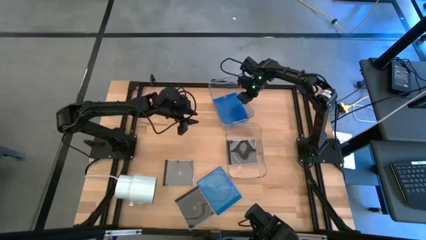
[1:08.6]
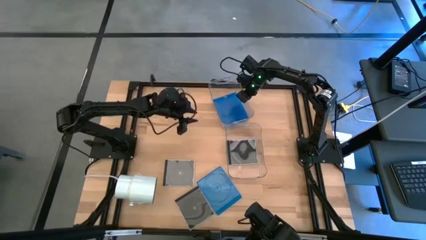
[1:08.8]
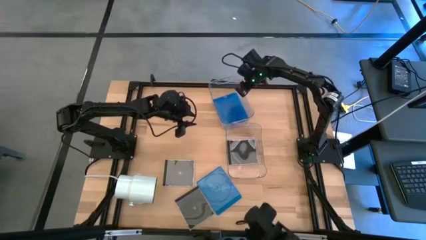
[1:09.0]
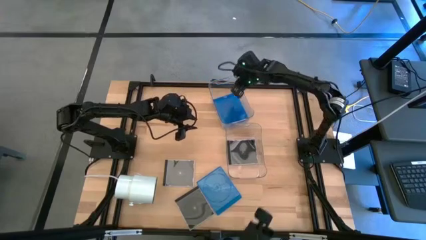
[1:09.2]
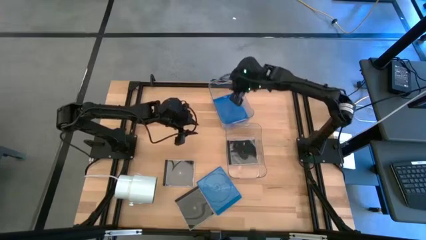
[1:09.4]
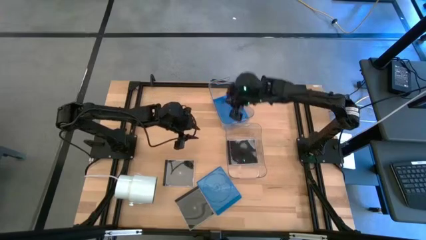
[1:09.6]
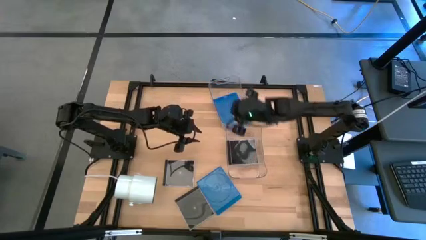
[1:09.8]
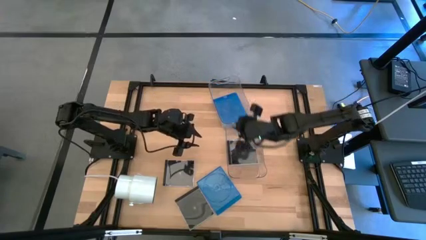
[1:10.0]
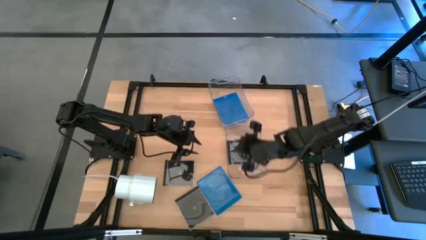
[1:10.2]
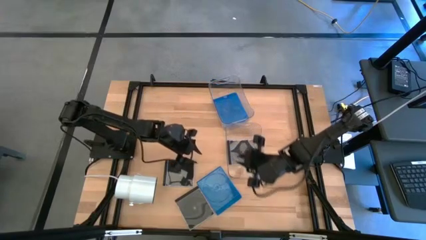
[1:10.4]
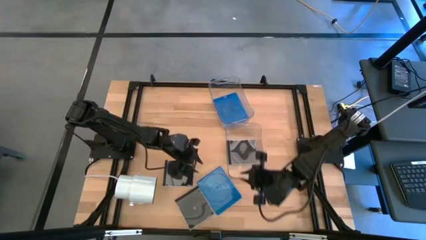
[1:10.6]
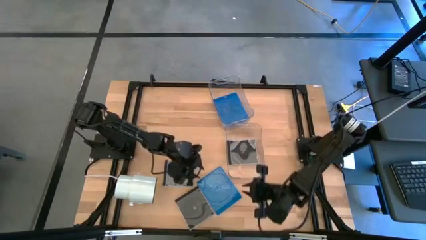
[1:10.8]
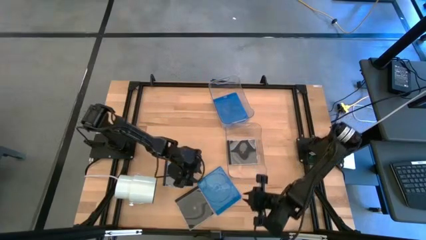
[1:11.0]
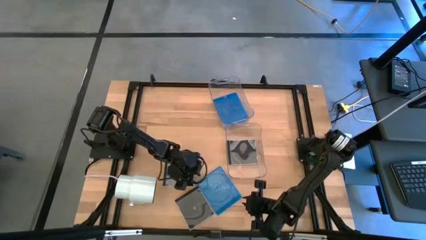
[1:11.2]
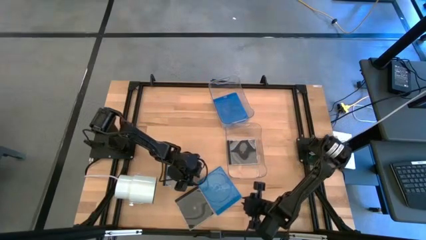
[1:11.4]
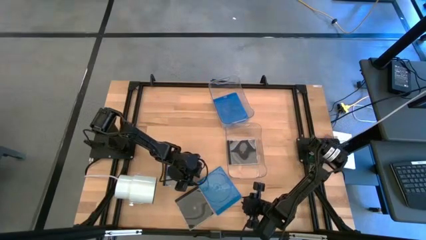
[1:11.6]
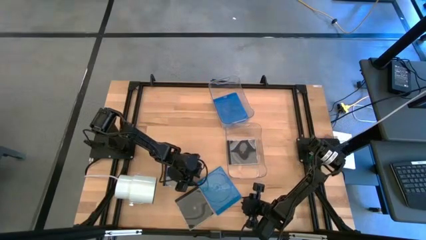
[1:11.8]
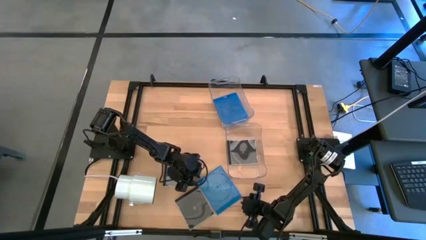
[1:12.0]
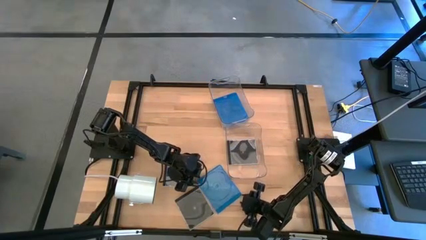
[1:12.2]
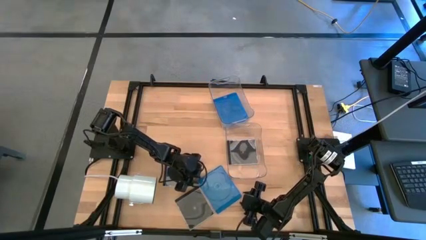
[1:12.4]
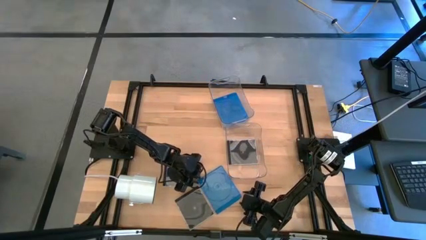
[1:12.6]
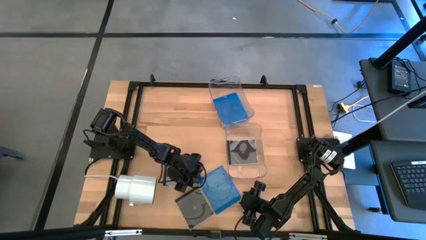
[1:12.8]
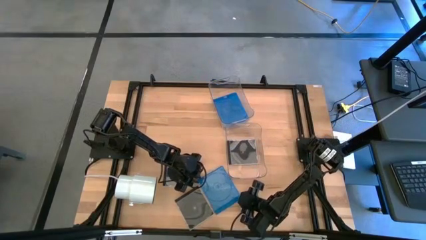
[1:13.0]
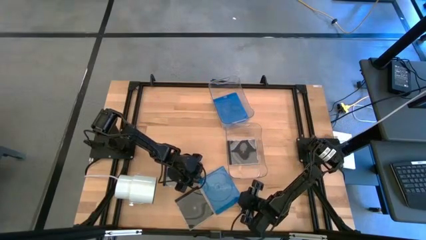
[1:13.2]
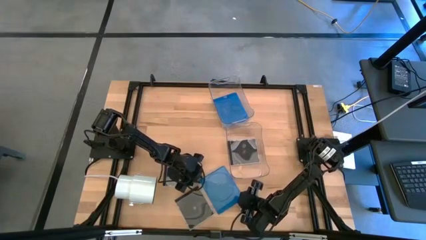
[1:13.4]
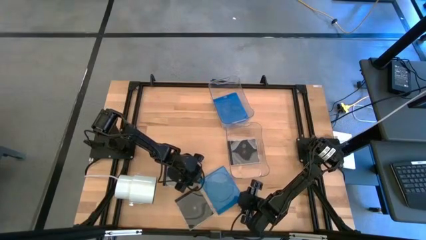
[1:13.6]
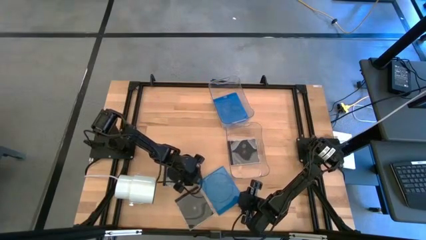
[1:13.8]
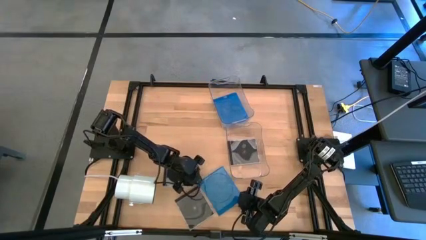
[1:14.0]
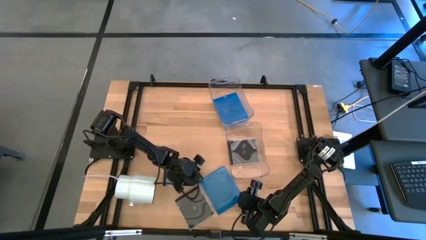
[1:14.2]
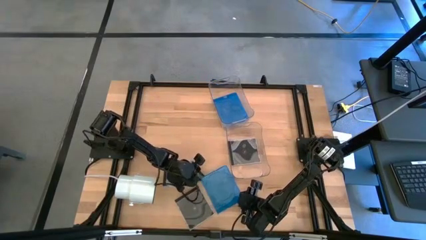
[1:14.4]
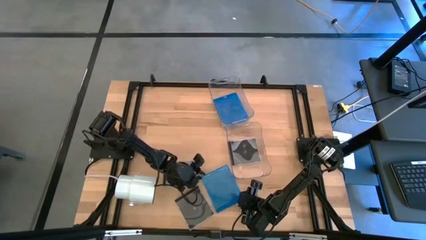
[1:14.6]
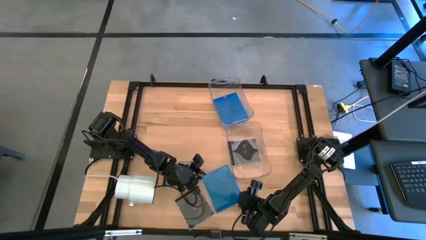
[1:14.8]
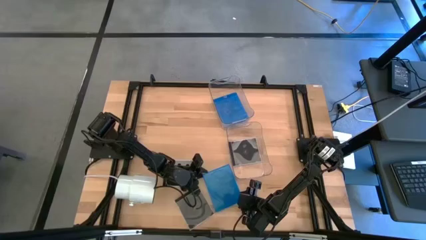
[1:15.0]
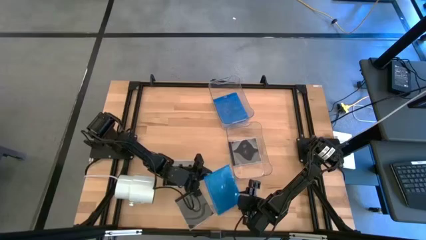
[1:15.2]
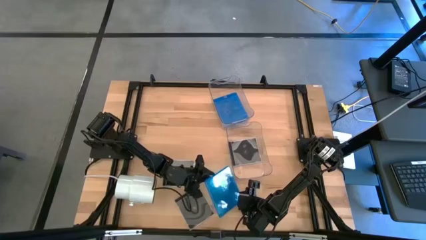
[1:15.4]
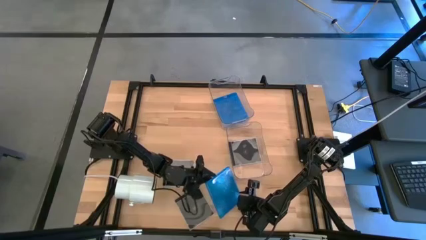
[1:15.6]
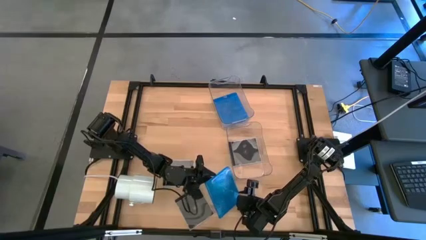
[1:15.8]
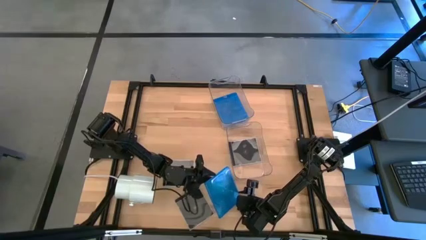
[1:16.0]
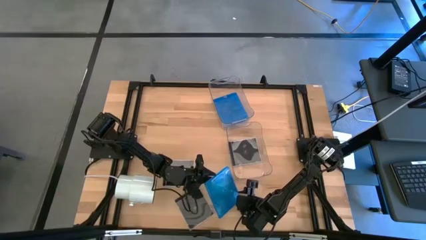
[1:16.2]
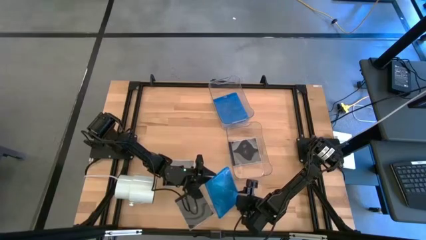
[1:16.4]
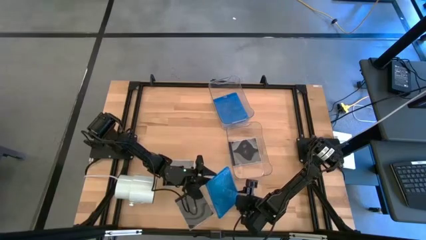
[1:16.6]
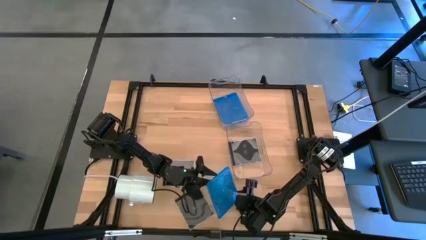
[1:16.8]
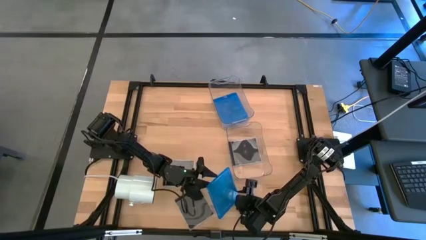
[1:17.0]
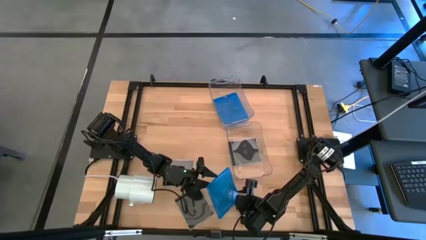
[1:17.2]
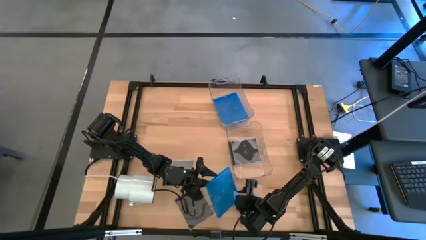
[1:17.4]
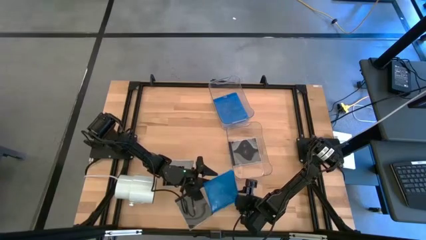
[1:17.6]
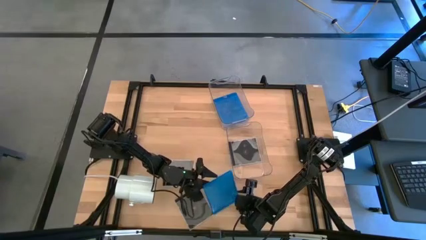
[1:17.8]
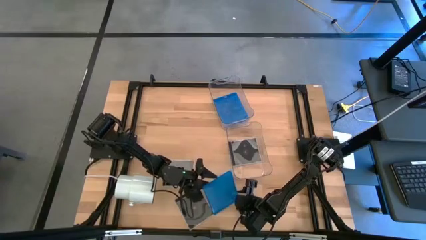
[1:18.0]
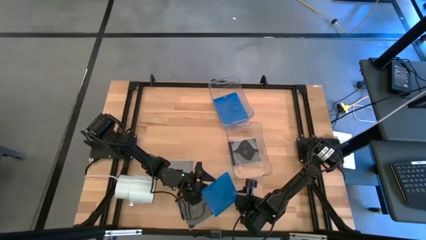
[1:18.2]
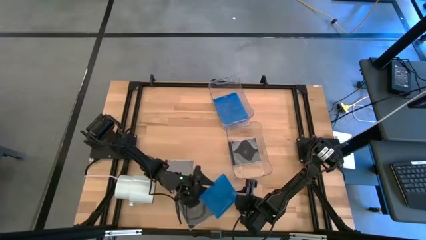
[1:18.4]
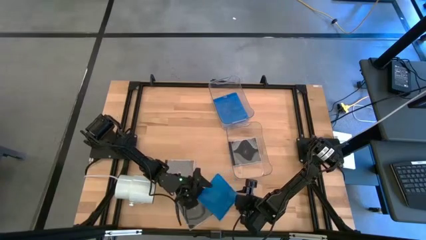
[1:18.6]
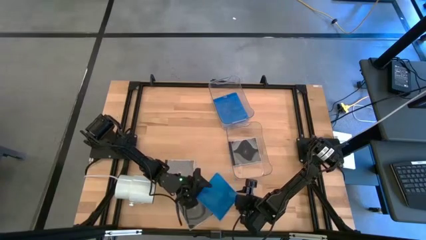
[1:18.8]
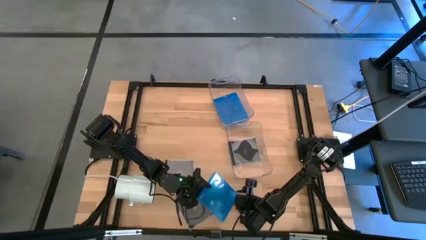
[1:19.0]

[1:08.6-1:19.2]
Task: Pick & place jewel cases by type
Put the blue CD case into the top transparent bin

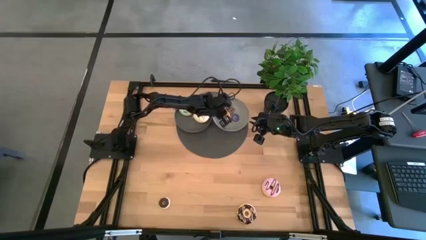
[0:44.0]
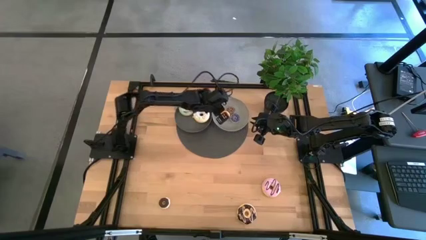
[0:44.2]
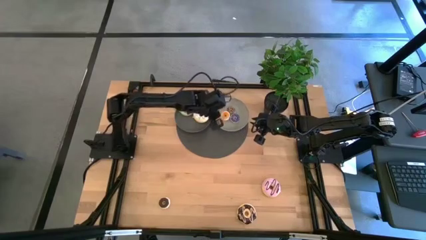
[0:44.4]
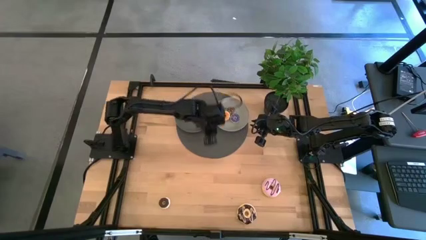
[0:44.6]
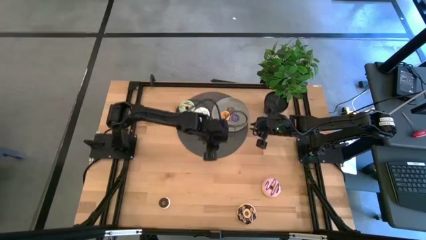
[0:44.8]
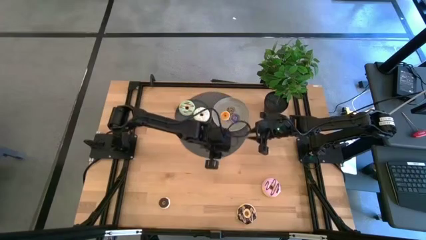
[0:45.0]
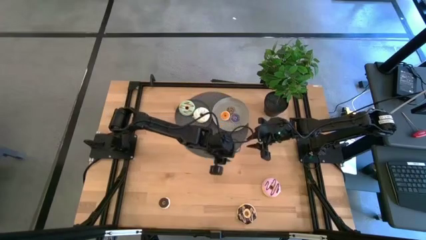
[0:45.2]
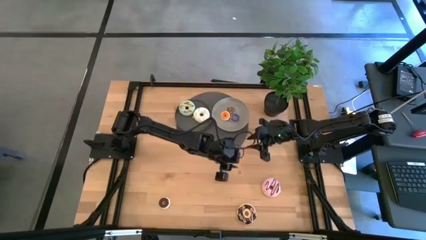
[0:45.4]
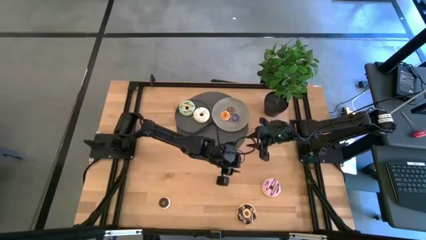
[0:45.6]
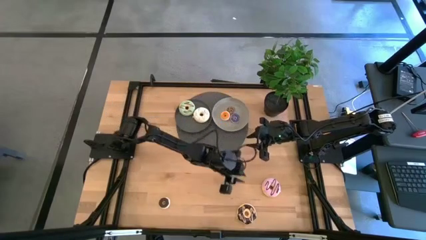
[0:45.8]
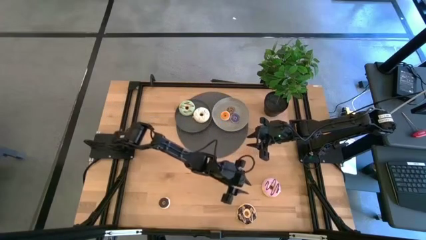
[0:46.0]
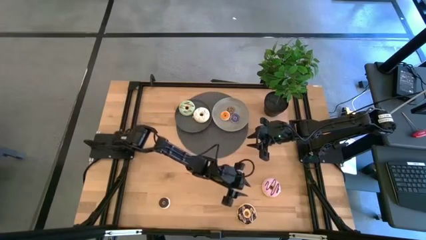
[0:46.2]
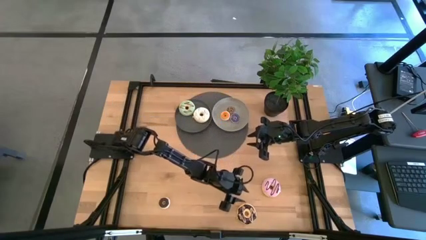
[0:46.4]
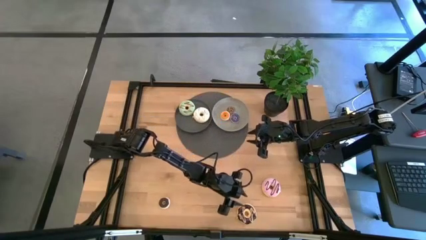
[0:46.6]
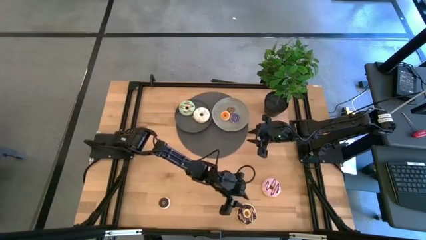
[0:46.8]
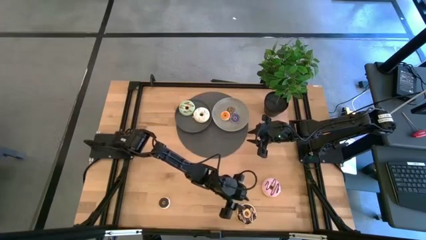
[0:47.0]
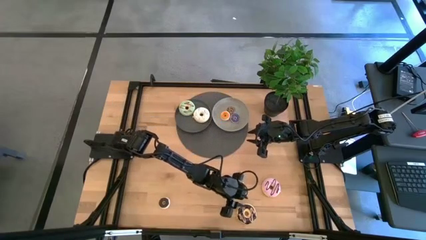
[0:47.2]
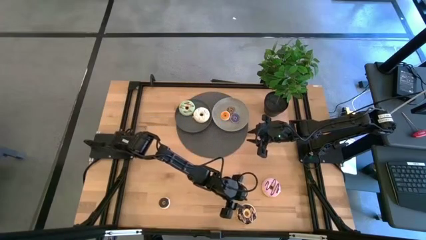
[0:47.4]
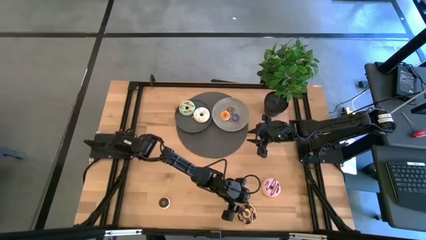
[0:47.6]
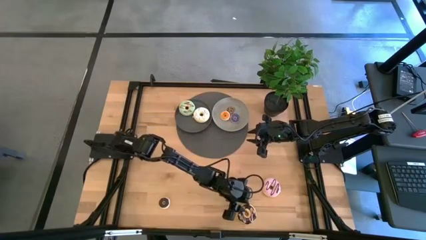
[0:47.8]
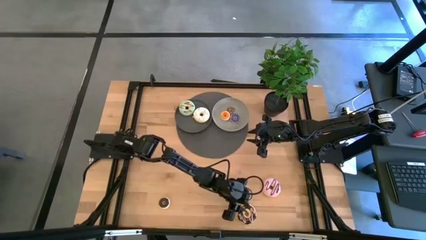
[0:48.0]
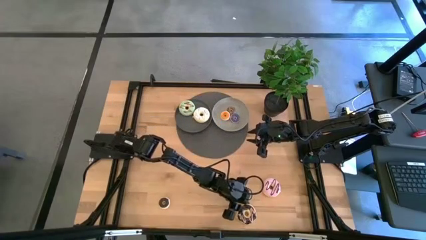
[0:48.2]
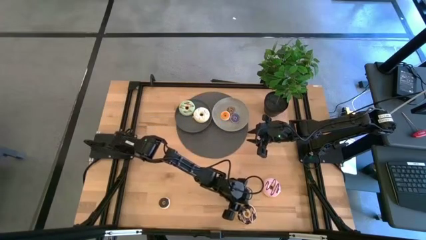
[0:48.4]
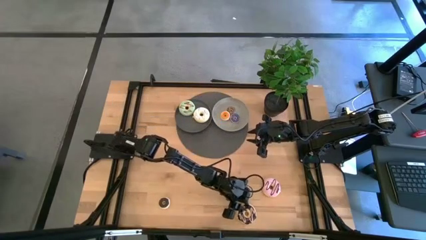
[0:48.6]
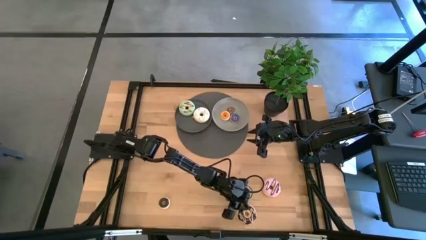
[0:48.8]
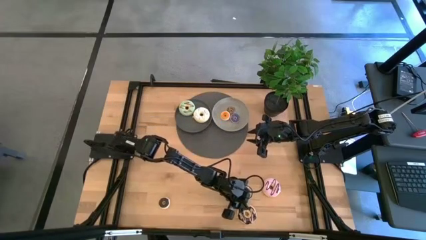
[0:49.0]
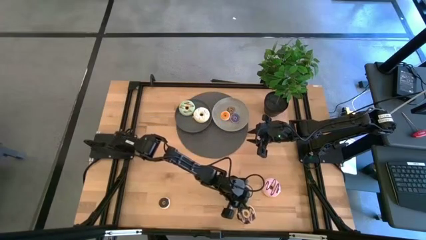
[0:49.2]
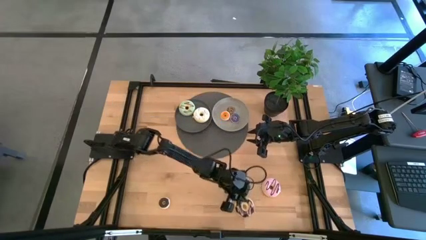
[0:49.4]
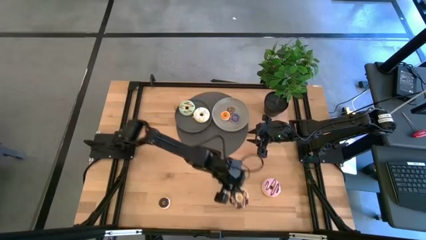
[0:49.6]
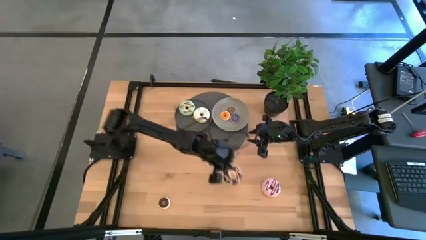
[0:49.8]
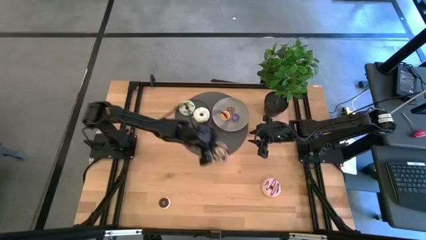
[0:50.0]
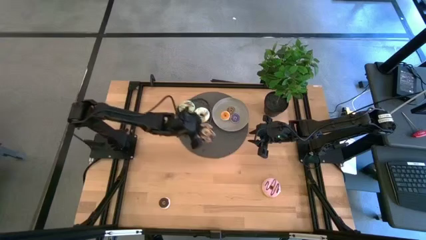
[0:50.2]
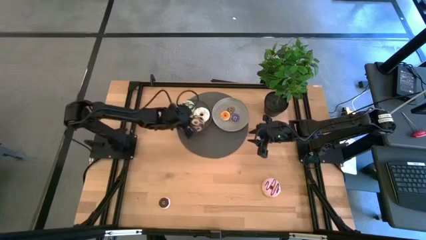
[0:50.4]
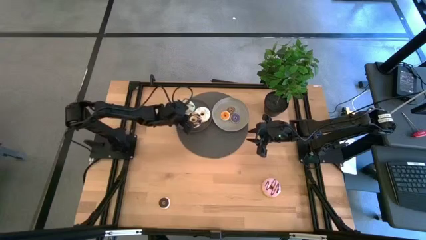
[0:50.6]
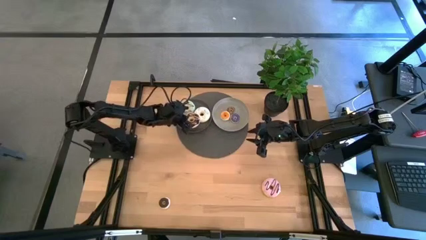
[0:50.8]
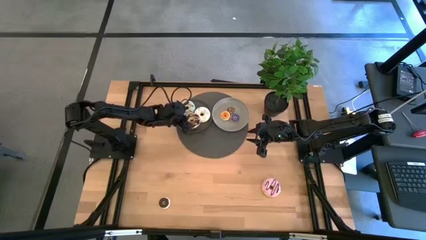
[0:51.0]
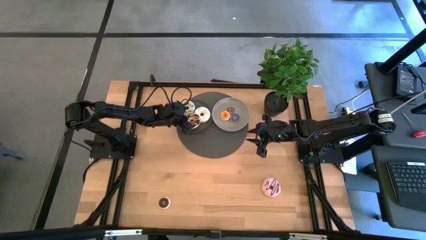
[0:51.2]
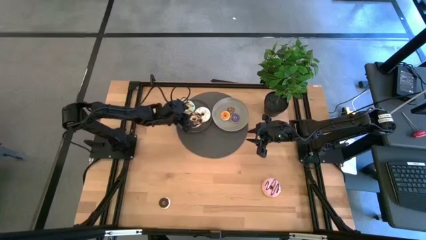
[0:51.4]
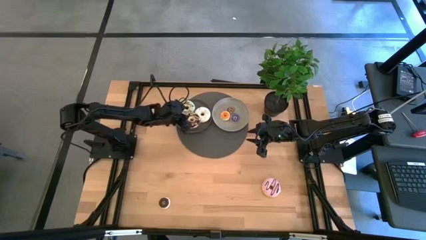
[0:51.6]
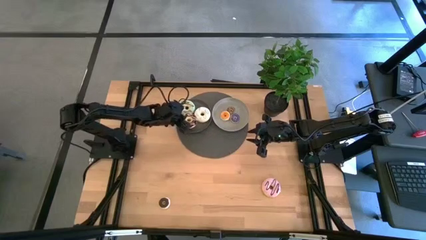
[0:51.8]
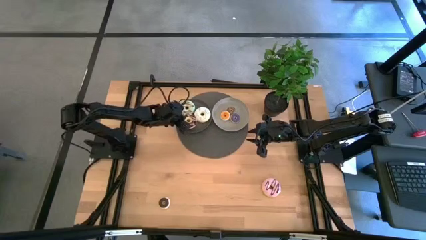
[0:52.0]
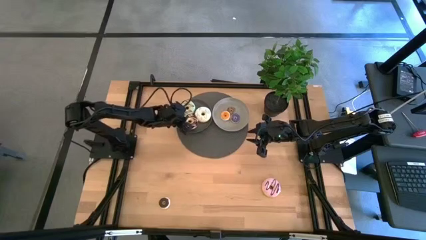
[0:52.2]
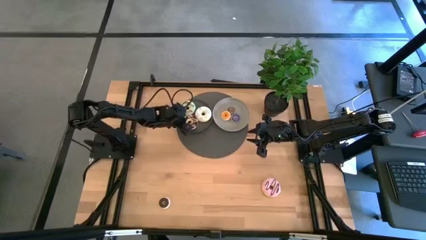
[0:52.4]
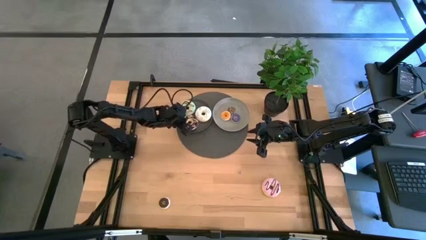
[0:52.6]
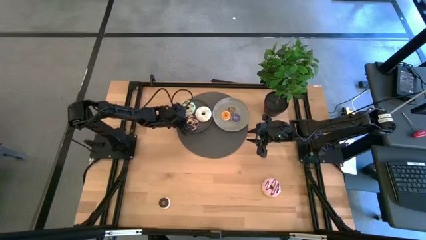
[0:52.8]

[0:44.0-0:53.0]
Task: Pick & Place donuts
Put the big black donut on the black plate
